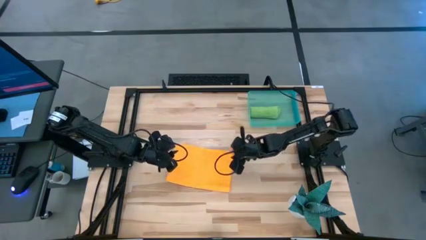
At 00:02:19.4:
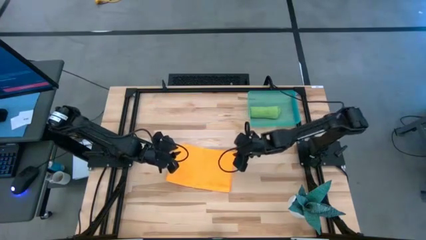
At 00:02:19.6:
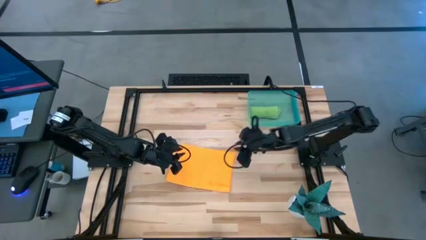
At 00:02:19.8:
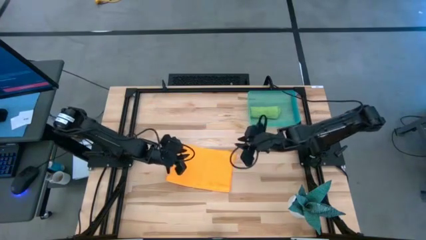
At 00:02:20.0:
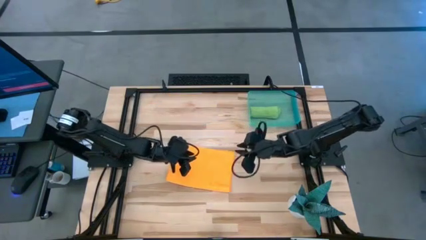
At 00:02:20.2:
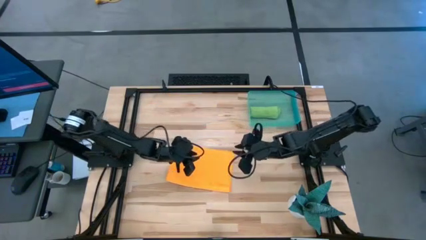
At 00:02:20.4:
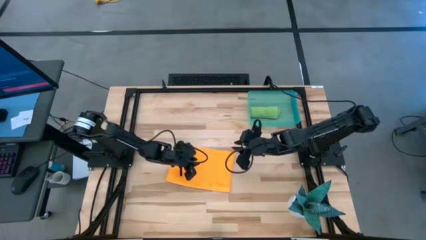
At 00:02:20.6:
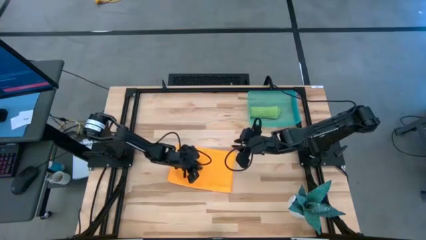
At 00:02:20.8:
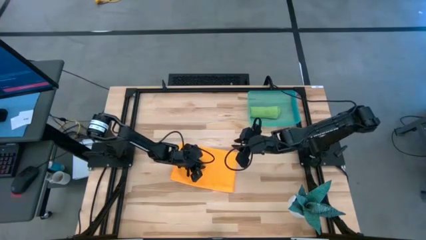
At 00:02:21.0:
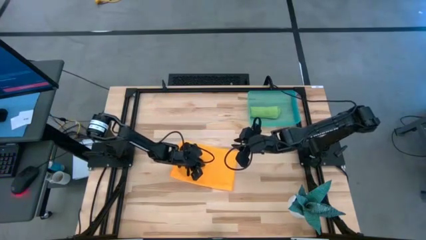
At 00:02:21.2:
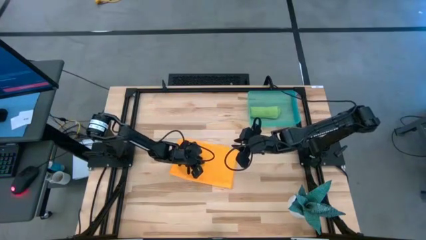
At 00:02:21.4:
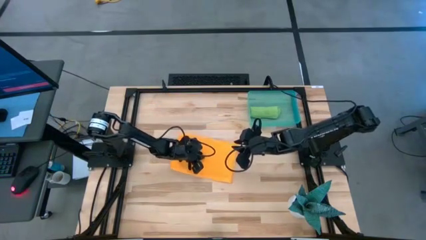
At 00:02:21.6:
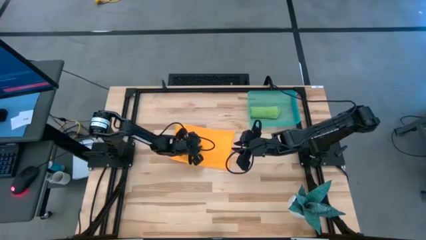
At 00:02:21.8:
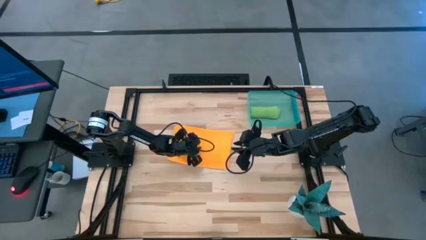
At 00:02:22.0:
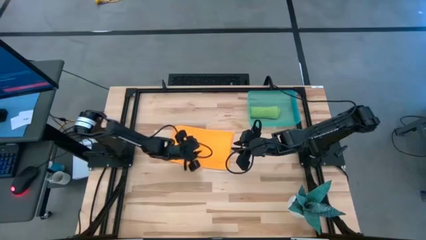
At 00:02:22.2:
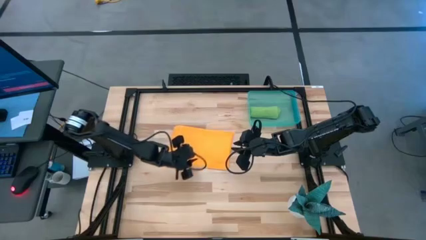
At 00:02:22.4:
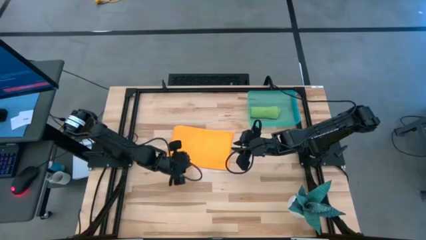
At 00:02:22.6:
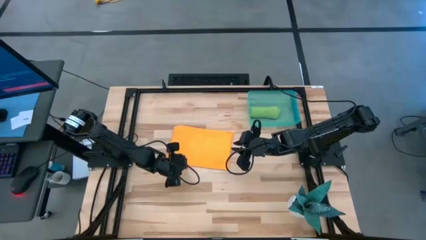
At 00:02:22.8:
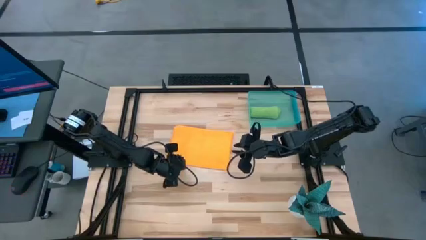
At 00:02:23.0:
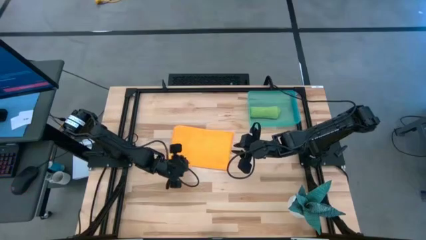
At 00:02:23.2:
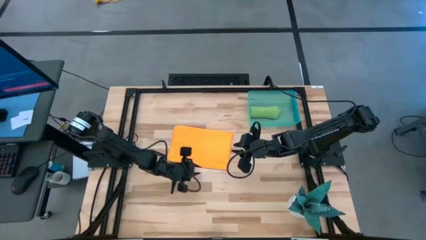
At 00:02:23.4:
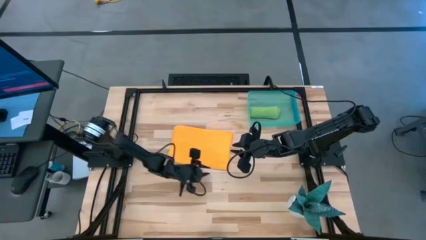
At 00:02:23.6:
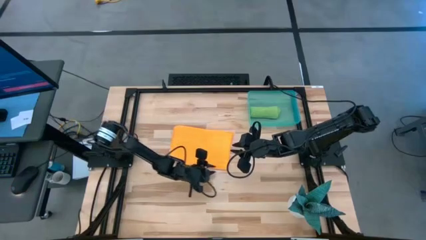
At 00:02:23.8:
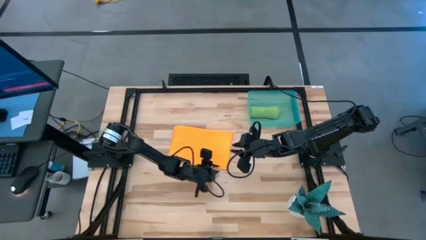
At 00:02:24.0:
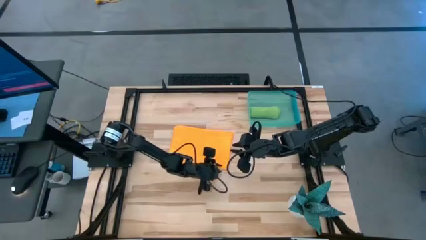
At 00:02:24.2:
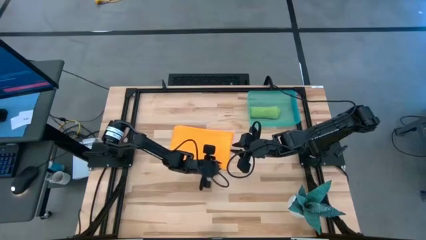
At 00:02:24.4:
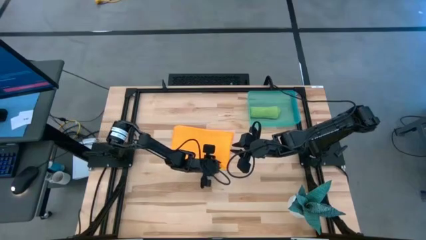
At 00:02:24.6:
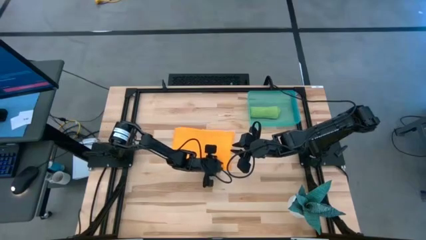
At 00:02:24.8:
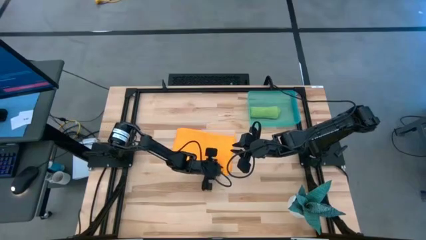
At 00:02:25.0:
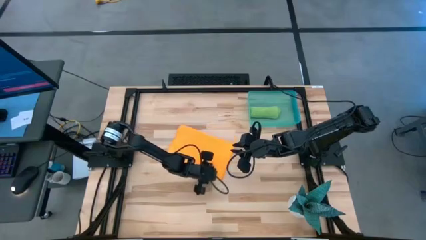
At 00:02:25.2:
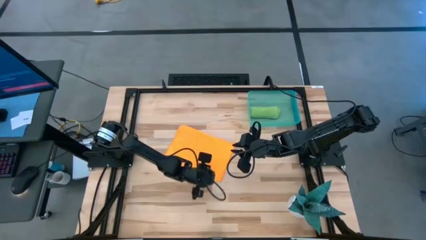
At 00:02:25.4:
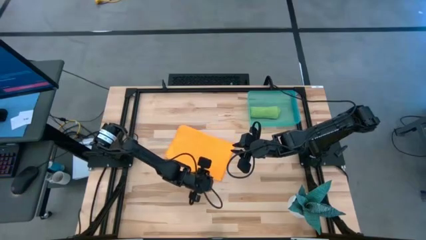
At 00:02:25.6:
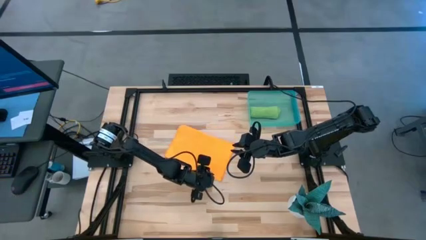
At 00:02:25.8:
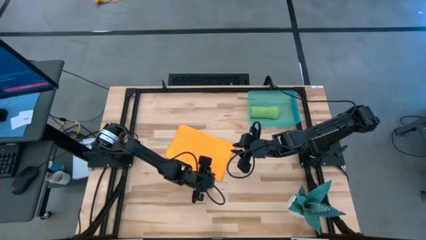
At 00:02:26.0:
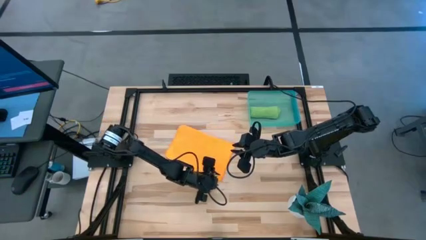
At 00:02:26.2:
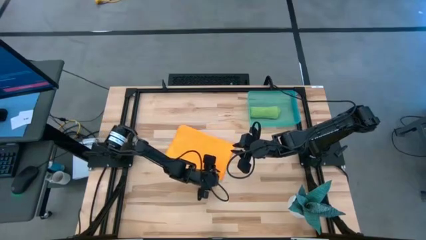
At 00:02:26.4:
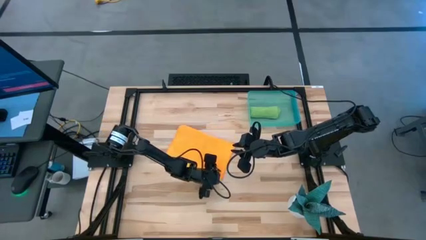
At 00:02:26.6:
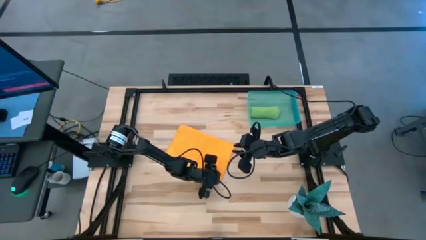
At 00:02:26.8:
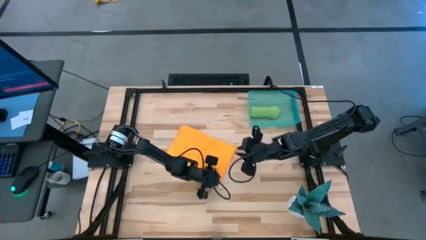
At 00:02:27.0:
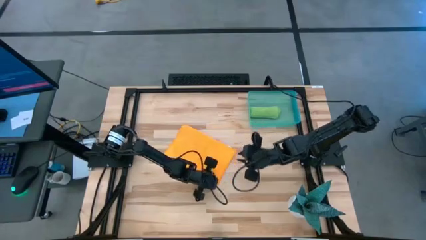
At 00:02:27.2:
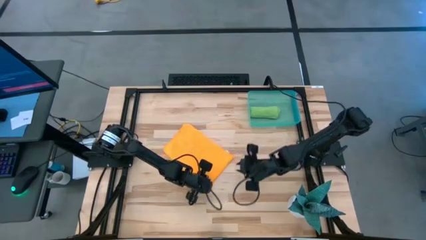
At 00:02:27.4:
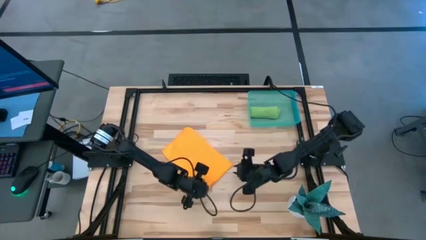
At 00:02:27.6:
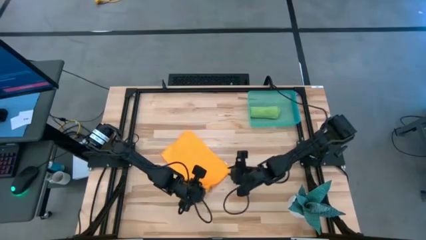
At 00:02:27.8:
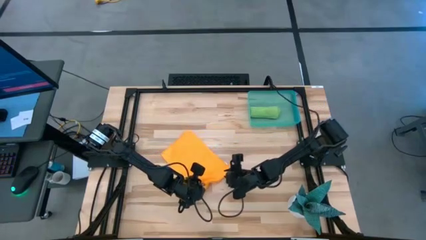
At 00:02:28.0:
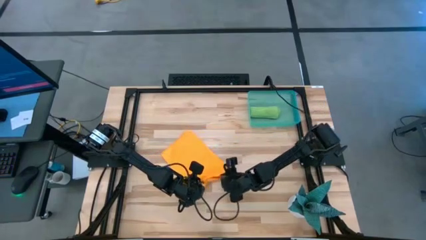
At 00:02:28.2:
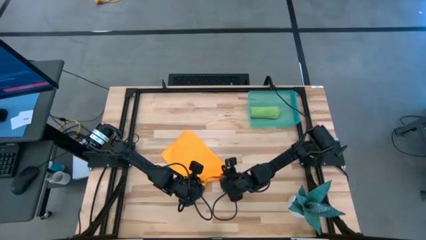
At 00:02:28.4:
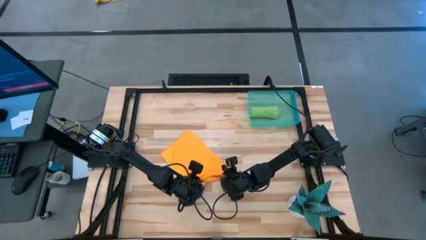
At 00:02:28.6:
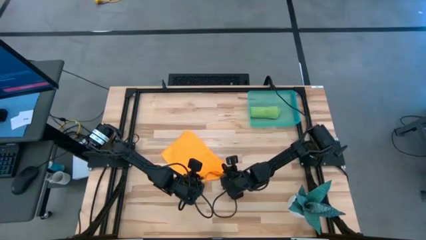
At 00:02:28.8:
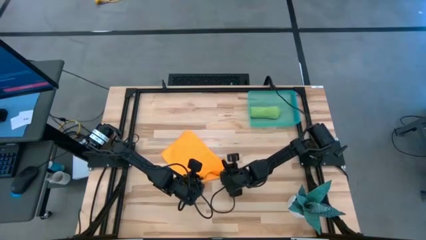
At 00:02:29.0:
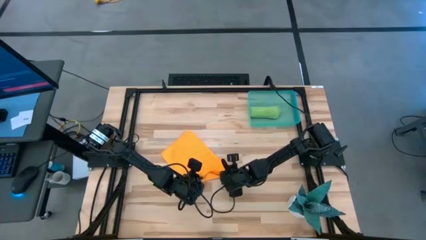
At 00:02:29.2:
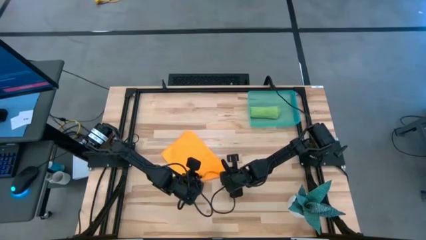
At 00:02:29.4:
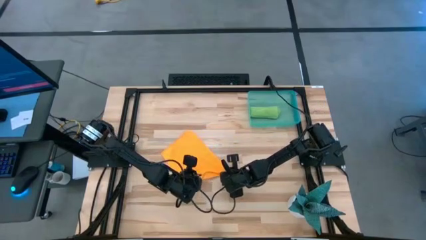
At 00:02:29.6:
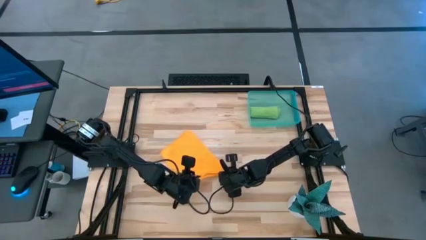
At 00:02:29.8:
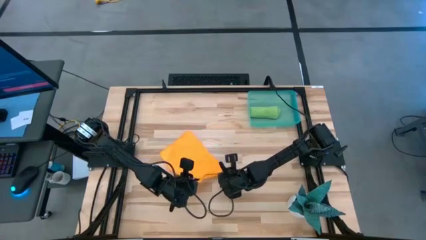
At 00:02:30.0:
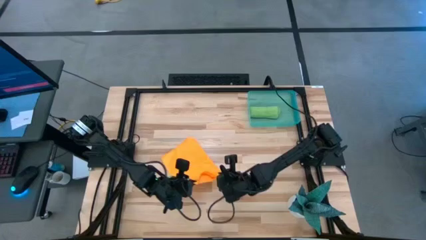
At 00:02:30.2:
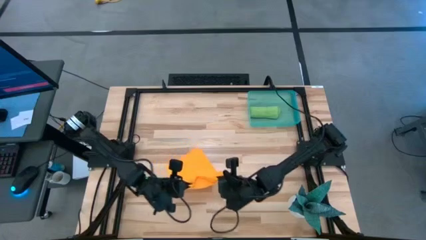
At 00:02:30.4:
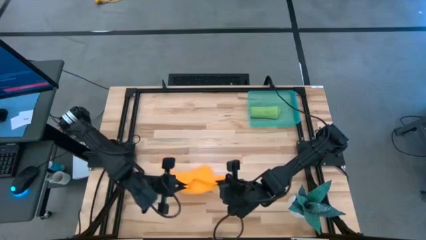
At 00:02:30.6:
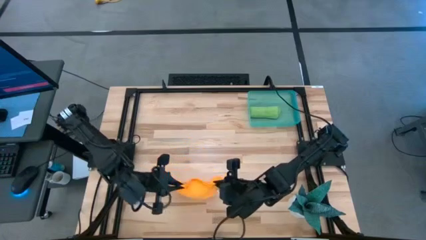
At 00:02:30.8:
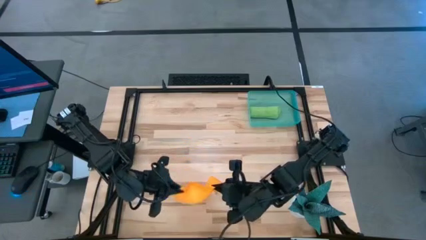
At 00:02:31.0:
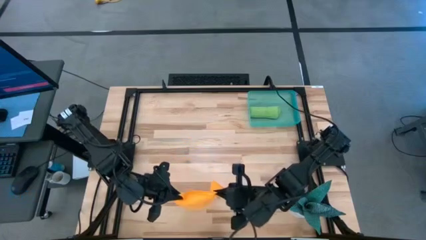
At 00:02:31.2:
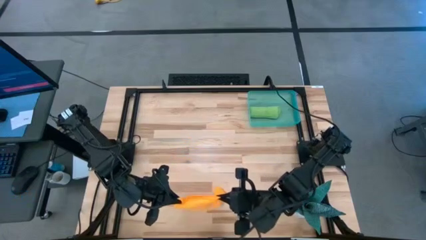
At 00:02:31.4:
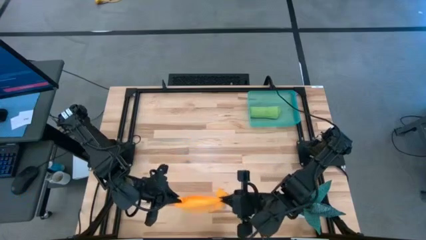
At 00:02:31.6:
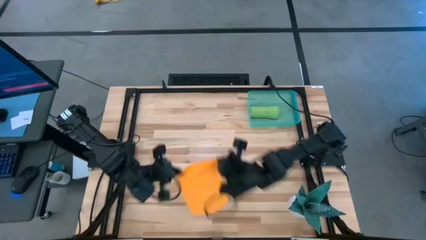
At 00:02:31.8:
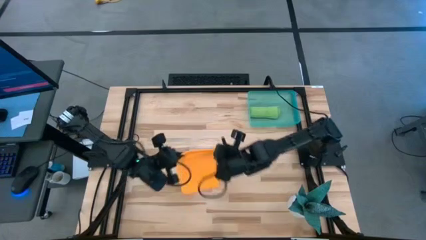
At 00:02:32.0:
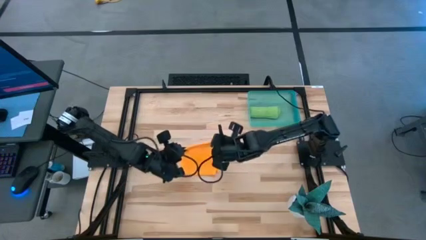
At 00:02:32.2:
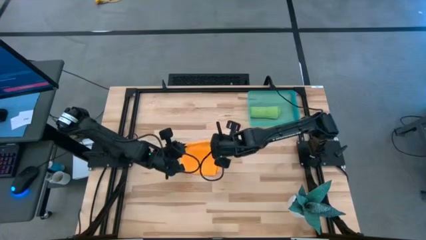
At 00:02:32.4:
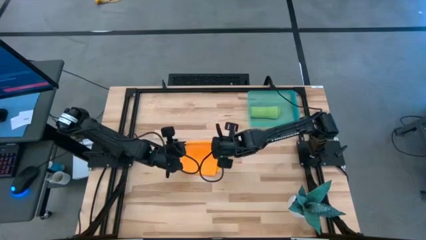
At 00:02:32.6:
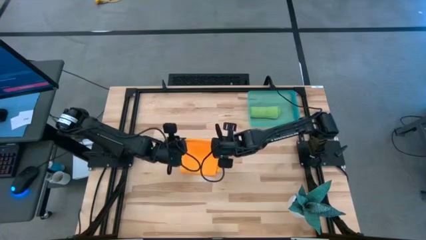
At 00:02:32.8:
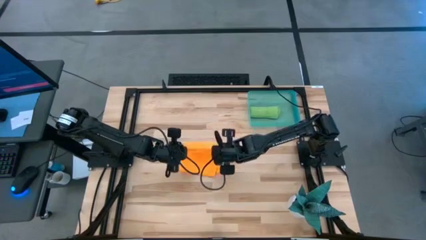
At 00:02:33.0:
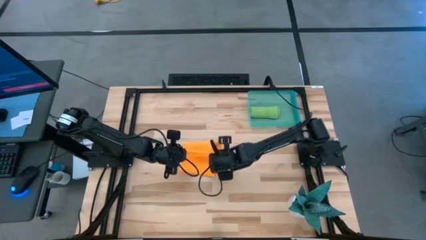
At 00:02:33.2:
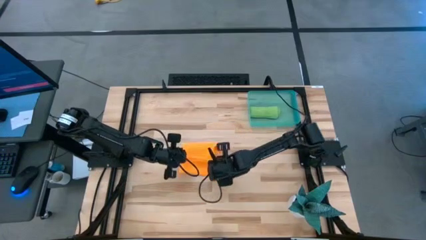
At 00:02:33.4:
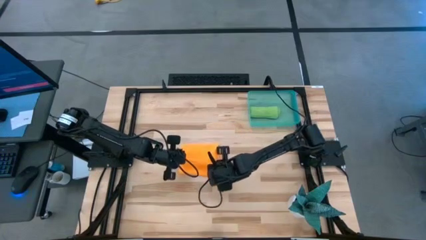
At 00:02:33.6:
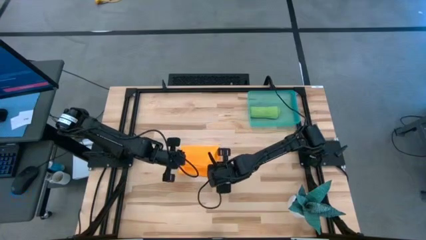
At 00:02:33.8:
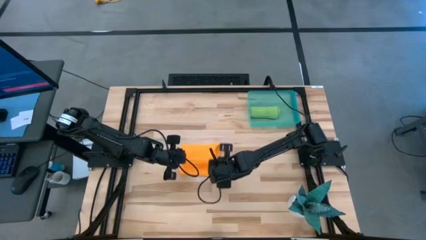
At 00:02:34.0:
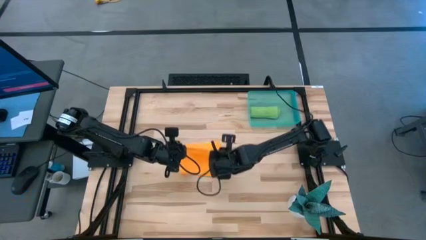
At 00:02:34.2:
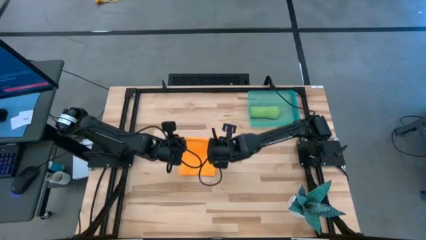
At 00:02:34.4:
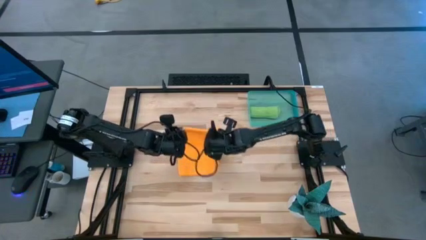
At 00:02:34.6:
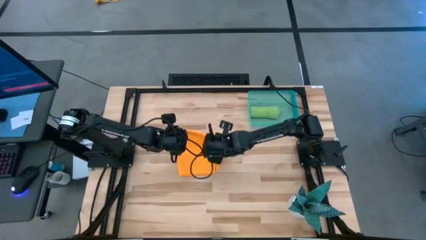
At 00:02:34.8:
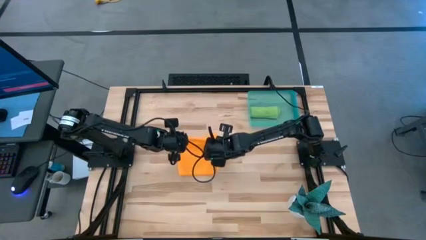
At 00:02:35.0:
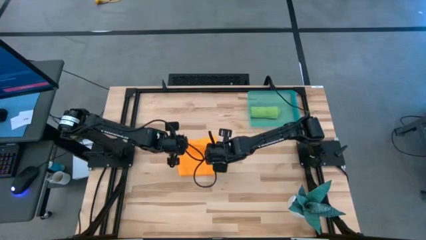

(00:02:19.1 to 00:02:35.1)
Task: Roll microfiber towels into tight, uniform cylinder then place into a basket
Fold the orange microfiber towel
